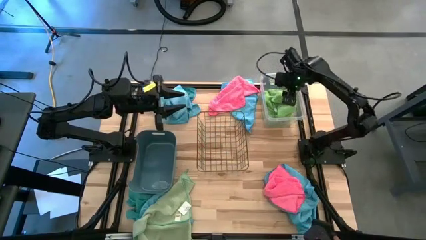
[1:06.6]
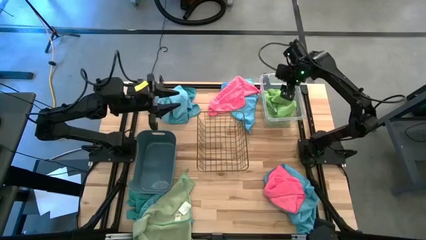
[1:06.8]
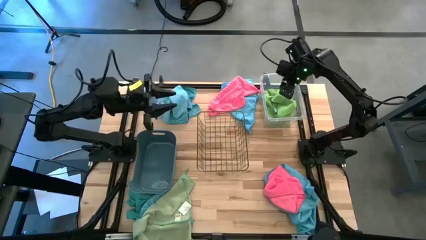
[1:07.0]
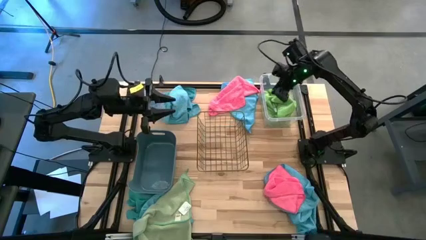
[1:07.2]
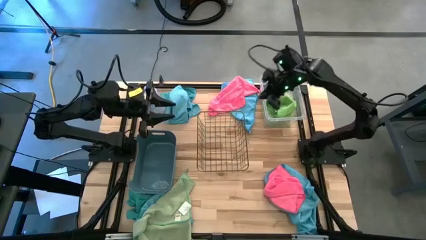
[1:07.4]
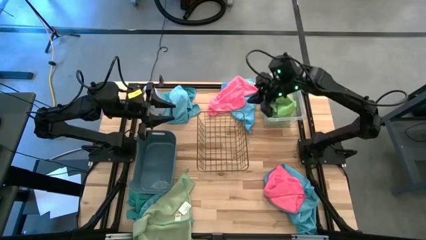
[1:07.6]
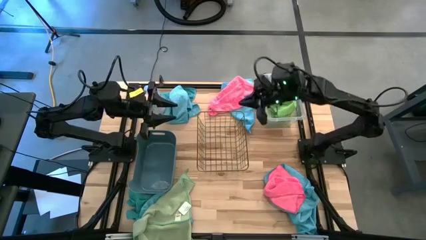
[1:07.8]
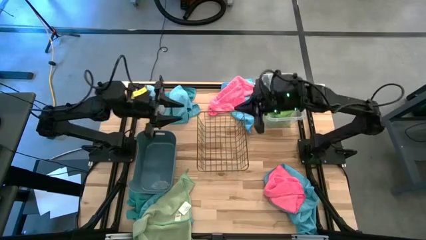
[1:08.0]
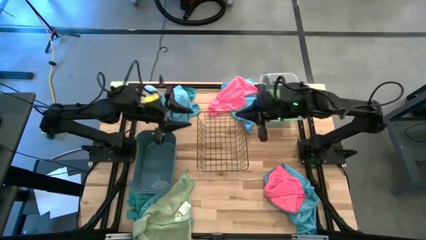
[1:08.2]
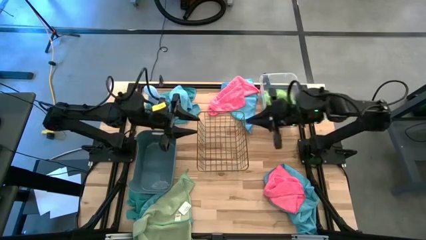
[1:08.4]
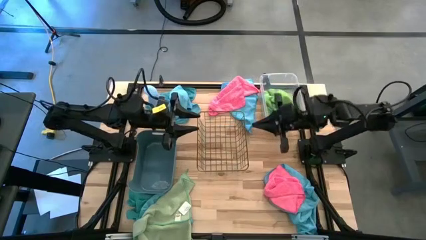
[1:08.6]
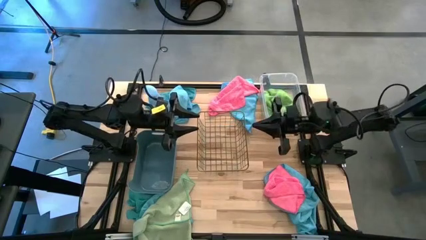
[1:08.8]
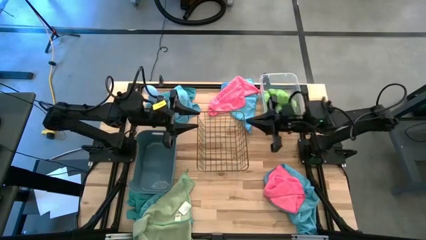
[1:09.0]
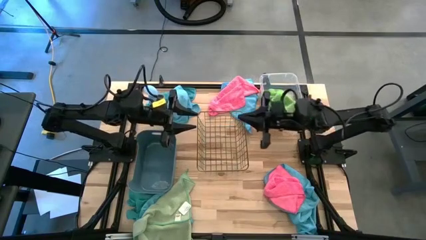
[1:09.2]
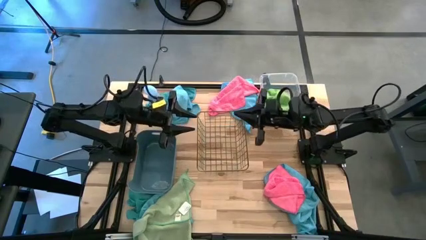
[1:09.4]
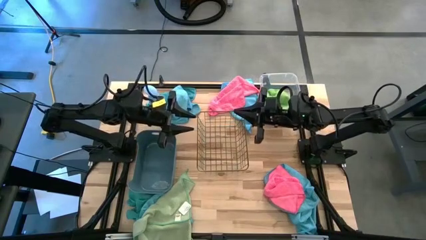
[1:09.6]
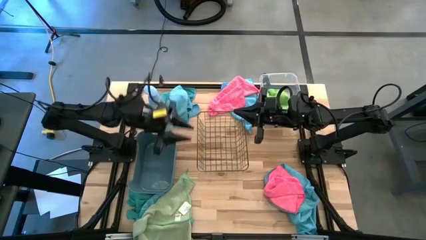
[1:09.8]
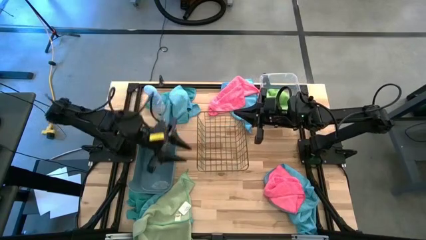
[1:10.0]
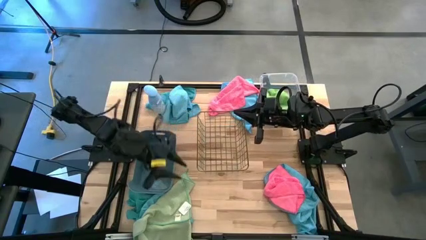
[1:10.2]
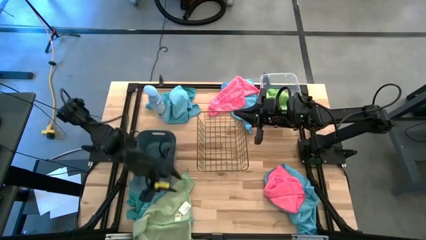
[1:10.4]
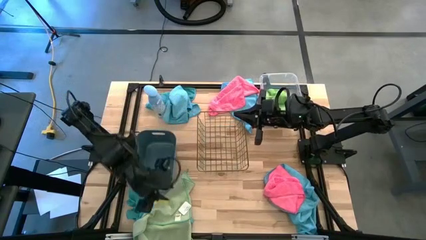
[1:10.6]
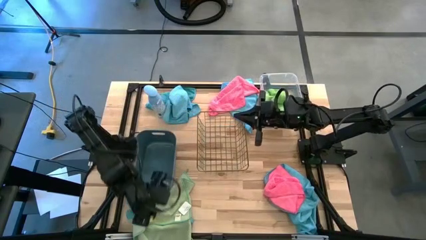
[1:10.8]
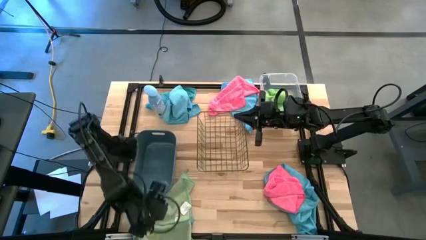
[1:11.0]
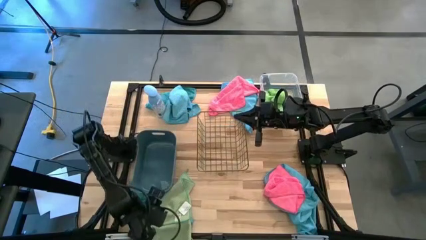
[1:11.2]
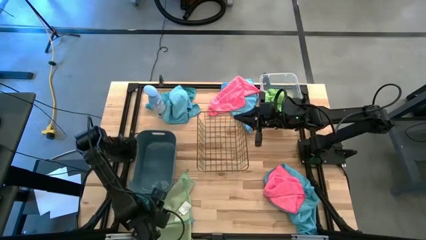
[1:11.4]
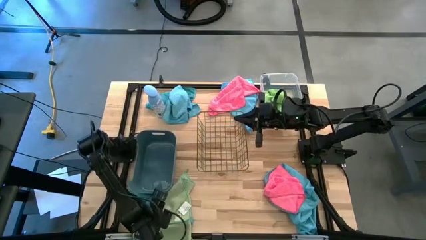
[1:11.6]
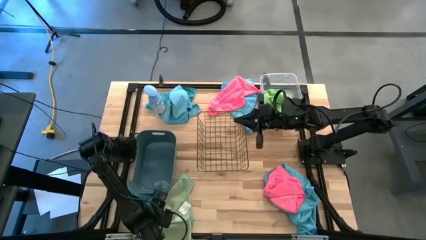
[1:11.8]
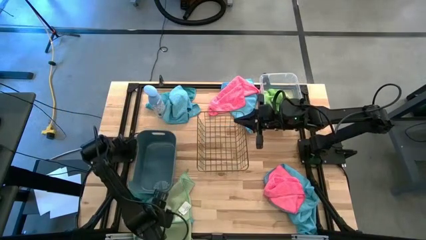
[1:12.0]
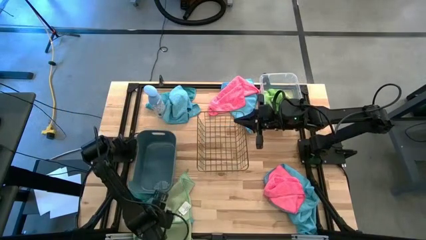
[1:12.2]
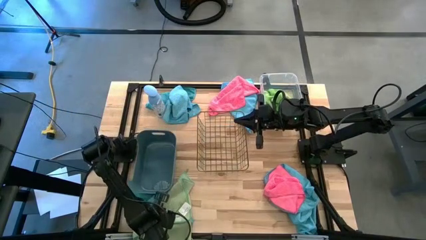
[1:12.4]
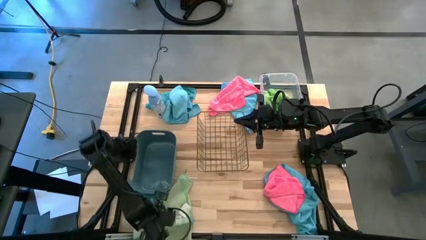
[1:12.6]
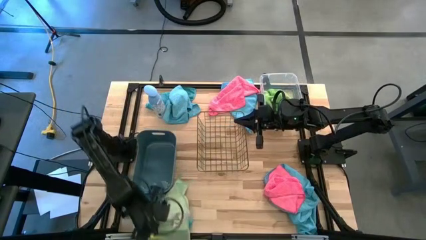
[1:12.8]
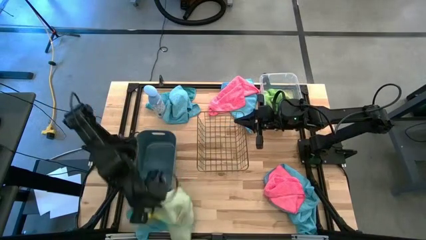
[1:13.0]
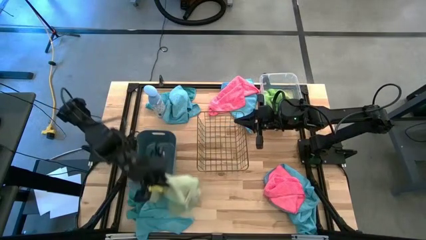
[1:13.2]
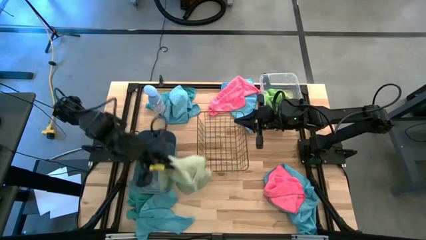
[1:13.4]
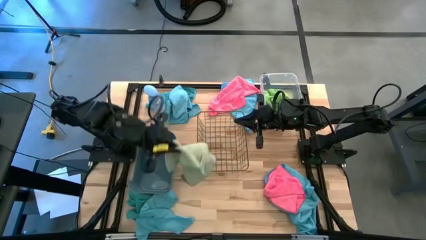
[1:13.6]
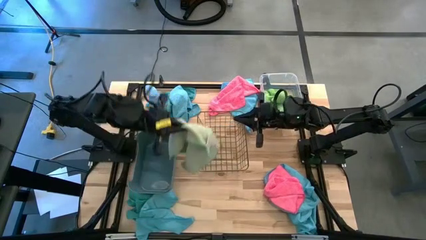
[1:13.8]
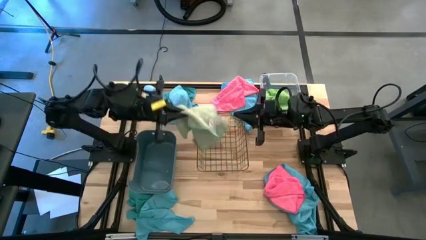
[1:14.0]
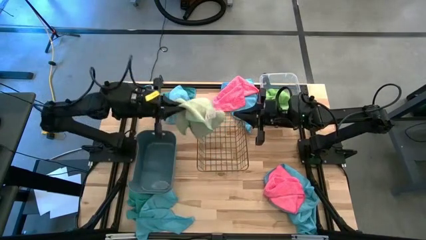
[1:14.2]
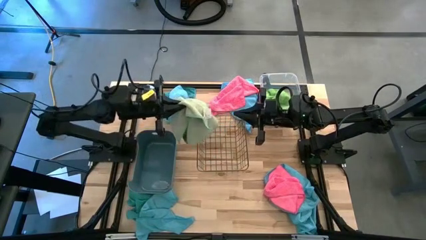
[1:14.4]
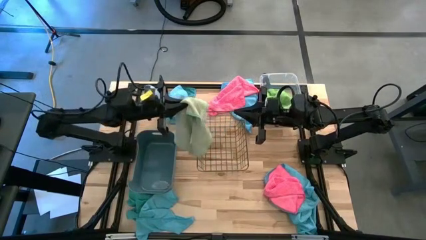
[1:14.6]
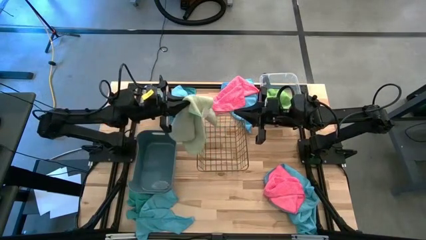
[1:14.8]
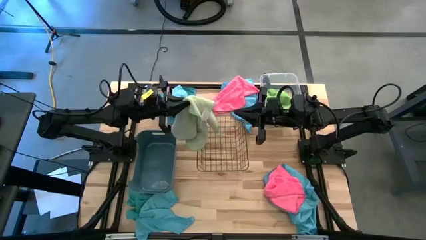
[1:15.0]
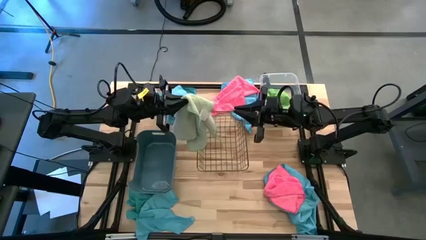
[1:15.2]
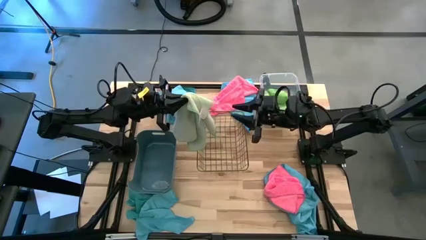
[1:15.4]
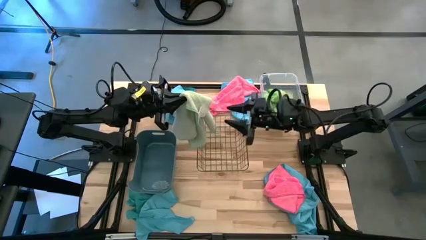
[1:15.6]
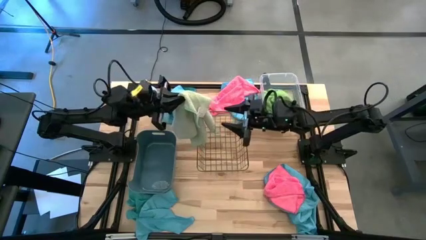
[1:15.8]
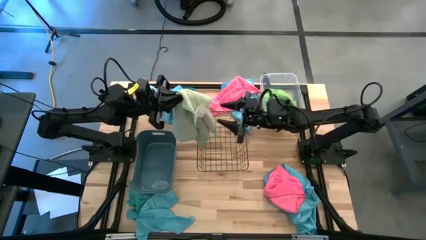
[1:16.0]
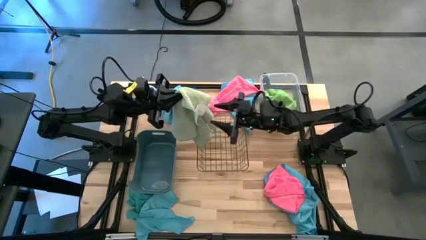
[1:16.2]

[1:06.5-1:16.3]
Task: Sort microfiber towel by color & place in baskets
Put the light green towel into the transparent bin

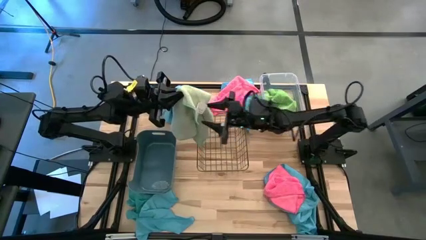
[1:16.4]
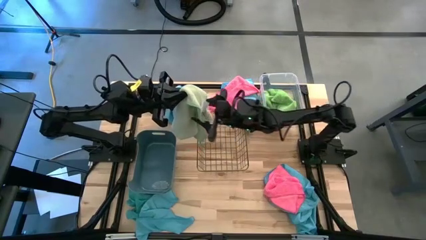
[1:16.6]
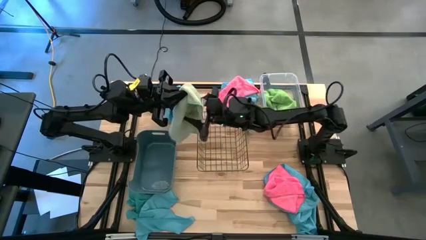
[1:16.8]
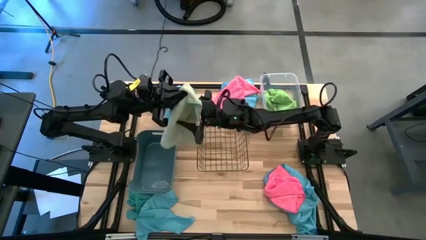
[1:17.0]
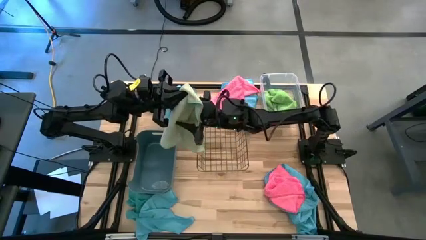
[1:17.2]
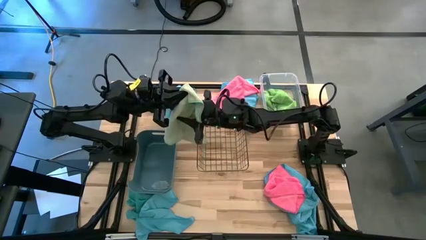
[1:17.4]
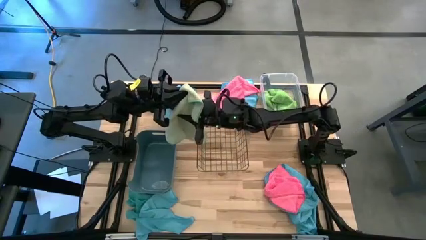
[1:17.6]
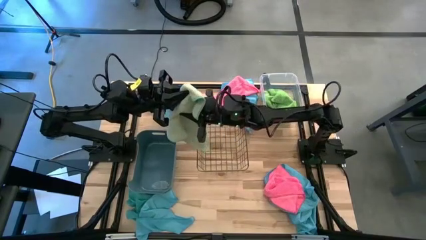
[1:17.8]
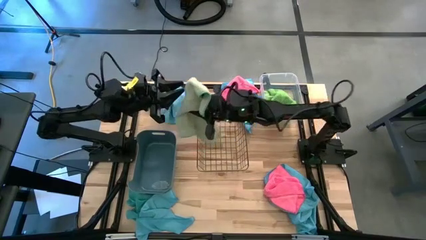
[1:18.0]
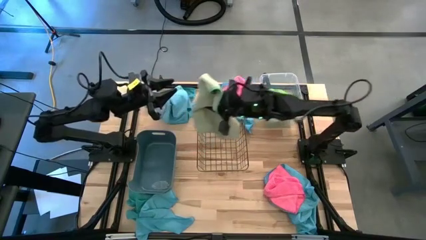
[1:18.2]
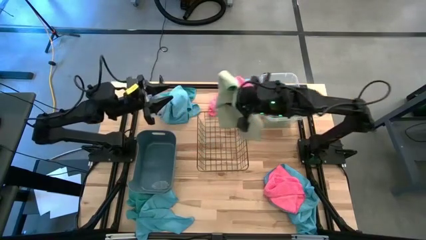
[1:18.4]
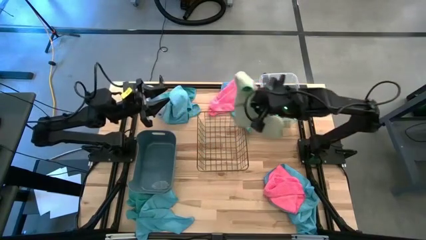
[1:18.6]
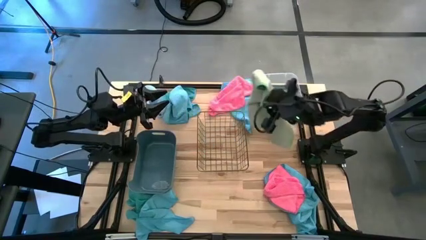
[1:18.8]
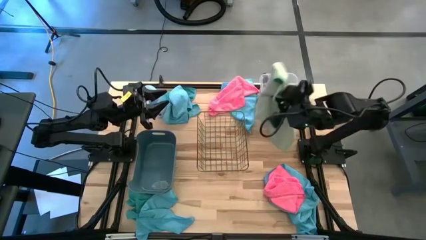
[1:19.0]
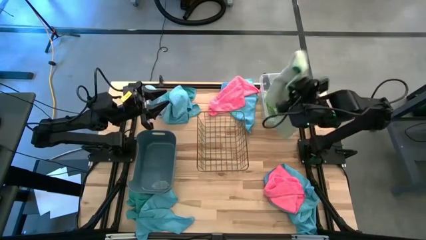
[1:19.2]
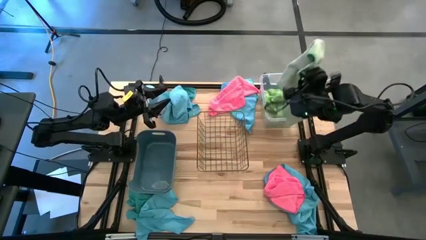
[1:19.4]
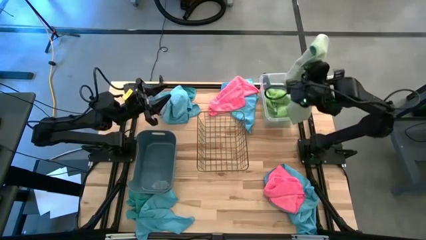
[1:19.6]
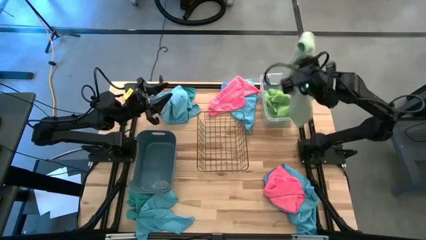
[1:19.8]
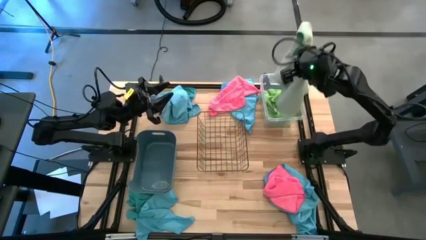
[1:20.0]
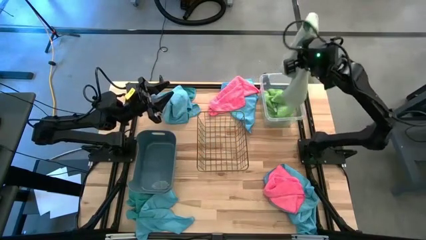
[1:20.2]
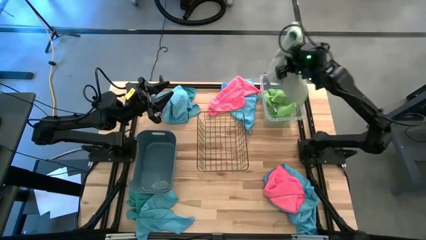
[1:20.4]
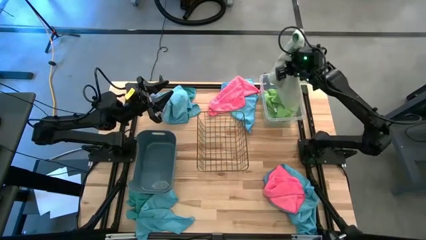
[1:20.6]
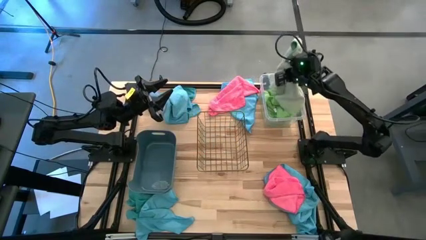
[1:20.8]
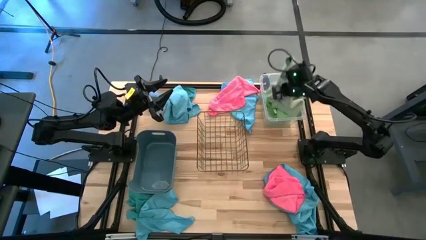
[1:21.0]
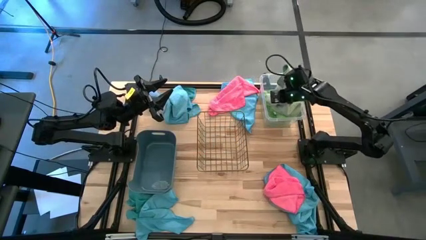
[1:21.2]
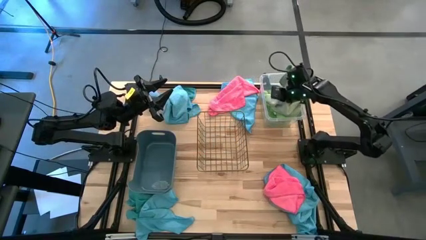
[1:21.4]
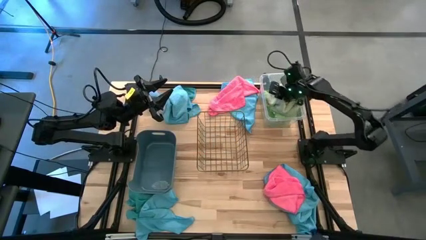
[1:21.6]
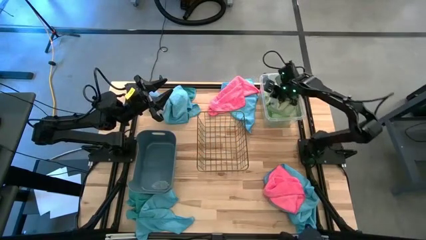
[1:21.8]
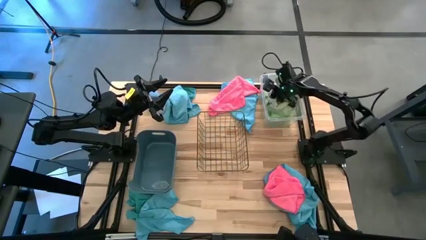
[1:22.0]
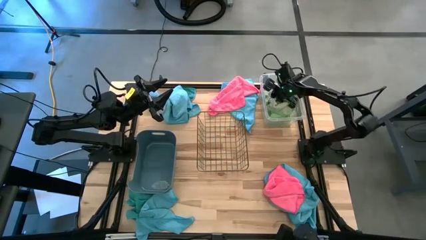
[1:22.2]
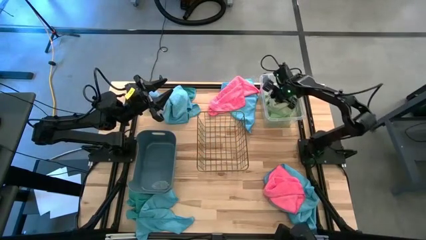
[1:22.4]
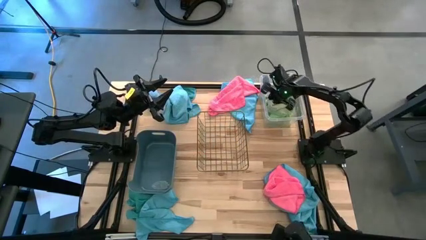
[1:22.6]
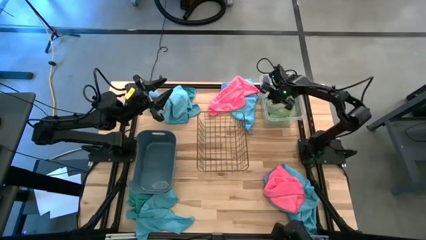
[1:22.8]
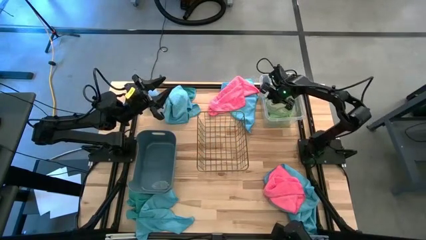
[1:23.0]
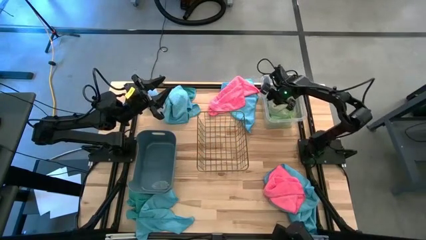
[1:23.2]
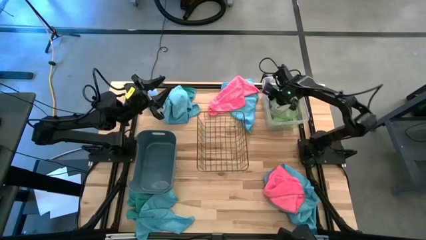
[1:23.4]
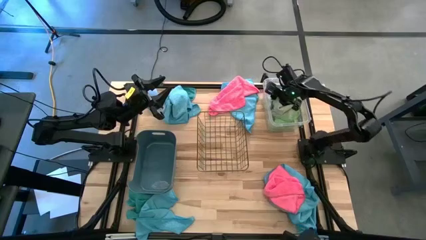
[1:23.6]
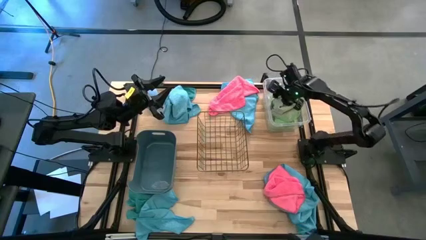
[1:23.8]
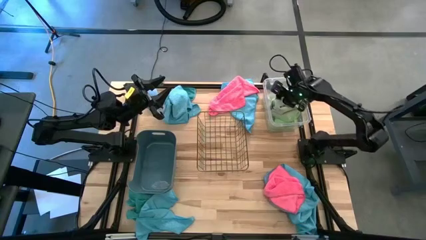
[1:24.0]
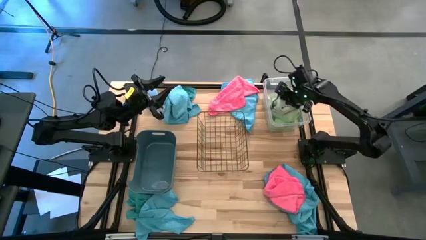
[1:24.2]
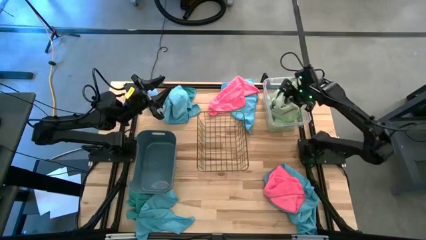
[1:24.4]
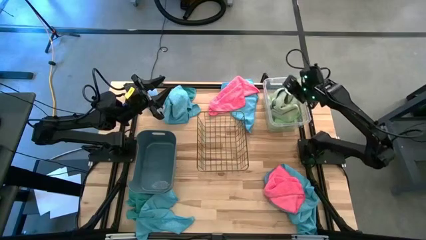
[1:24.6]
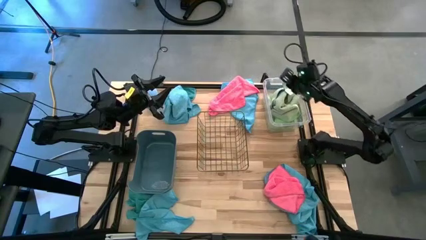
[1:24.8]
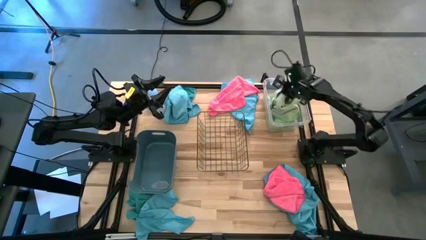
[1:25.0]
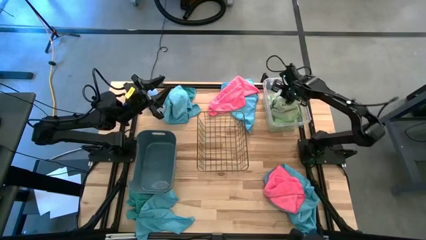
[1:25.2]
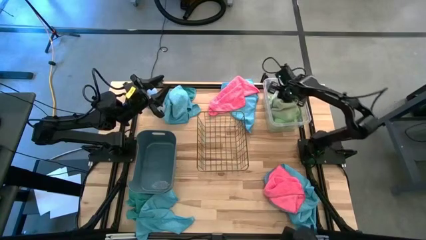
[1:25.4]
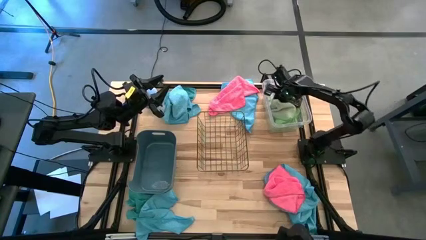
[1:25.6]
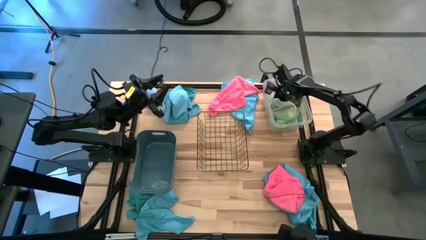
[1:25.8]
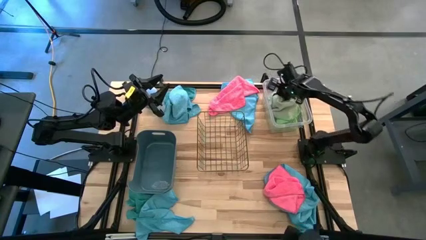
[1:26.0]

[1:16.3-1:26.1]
Put the light green towel into the transparent bin
